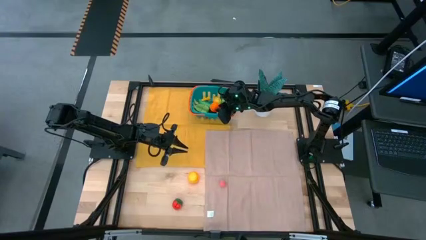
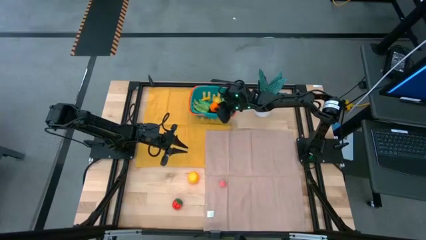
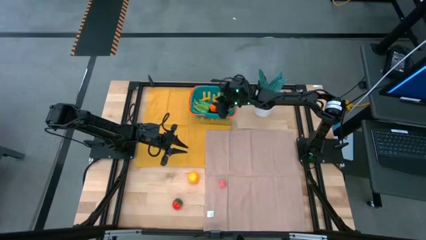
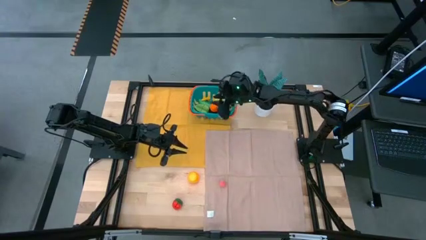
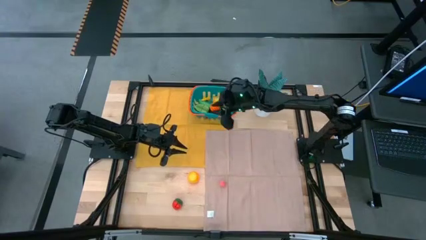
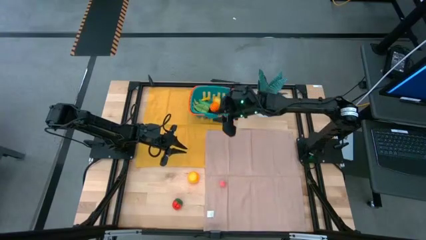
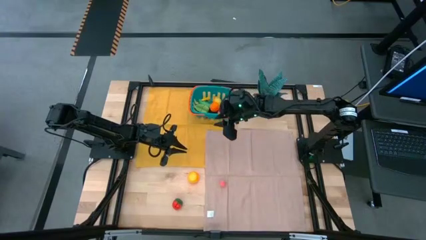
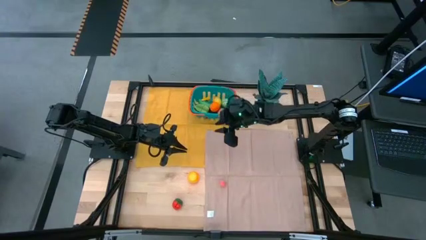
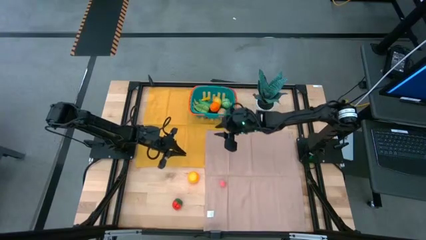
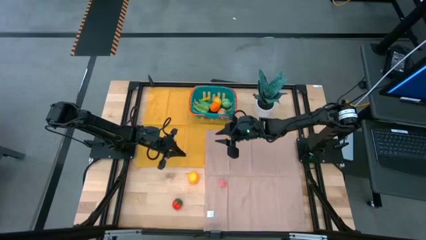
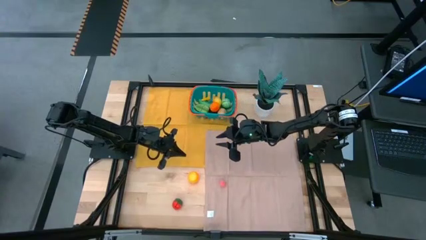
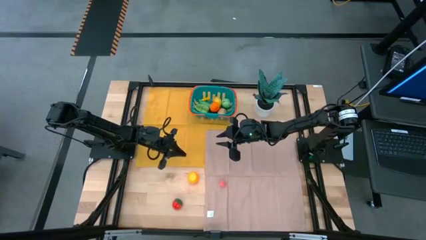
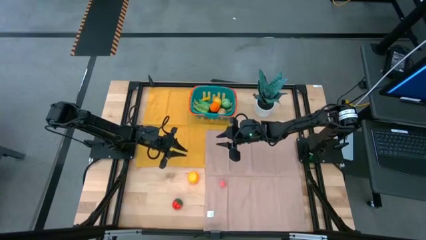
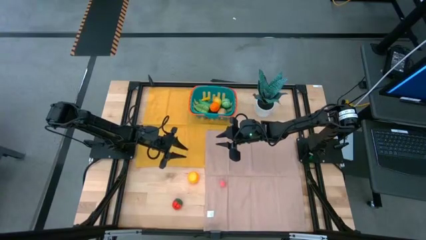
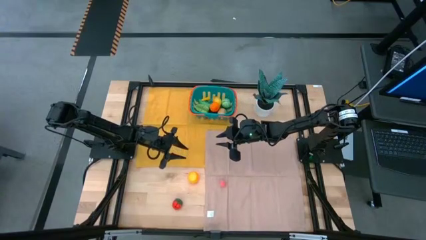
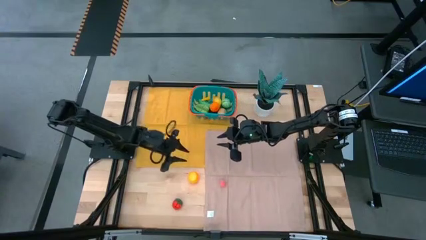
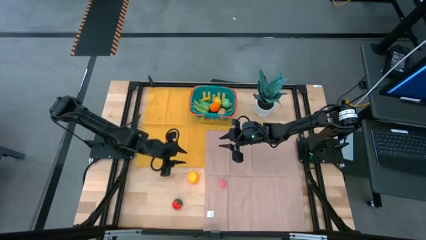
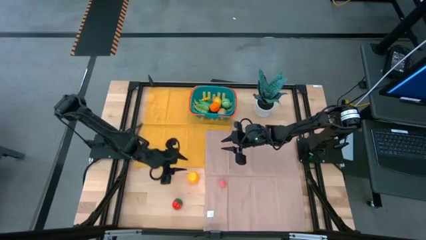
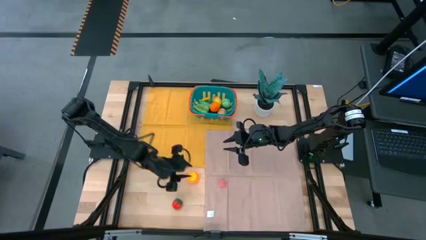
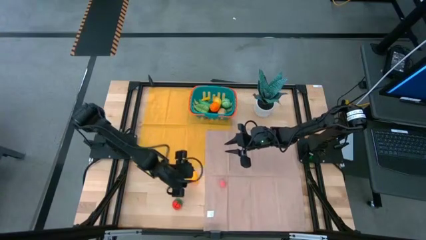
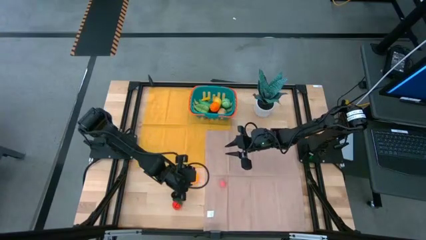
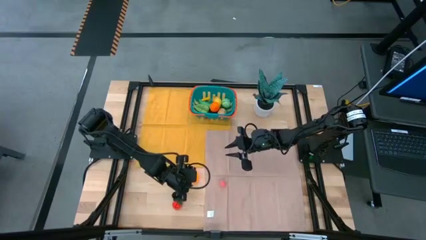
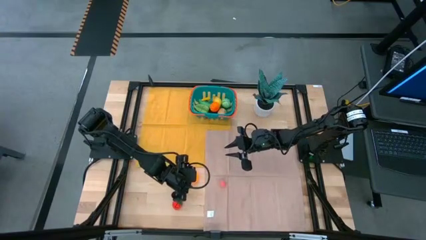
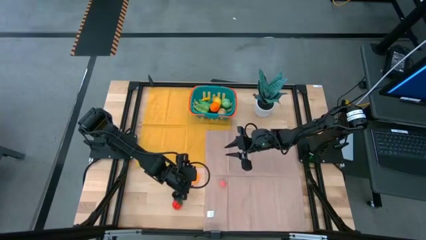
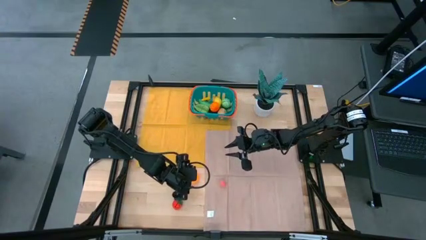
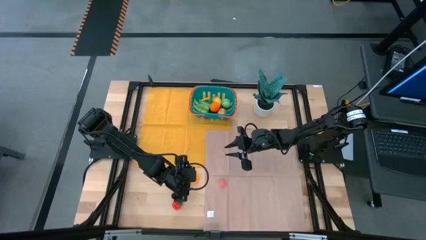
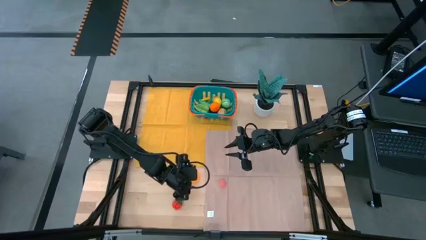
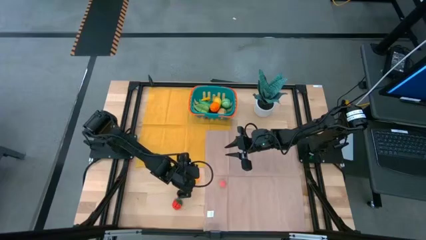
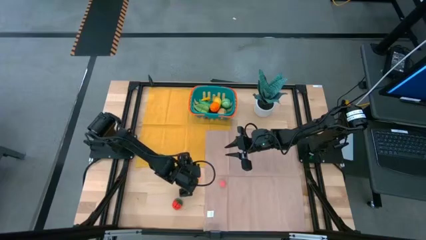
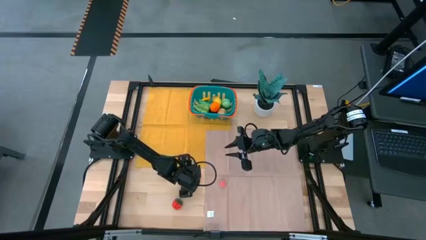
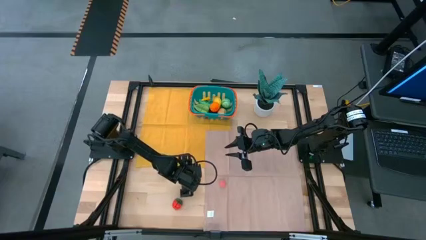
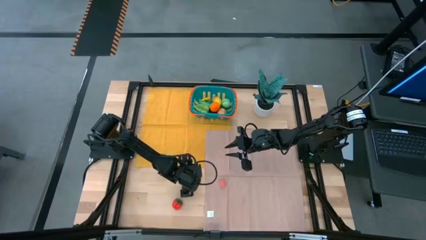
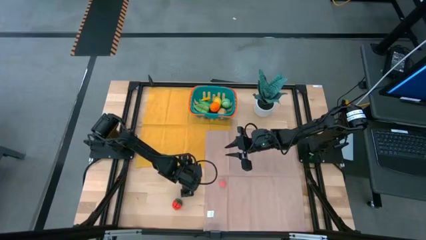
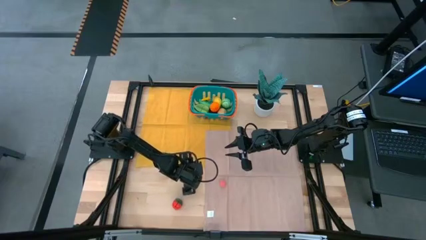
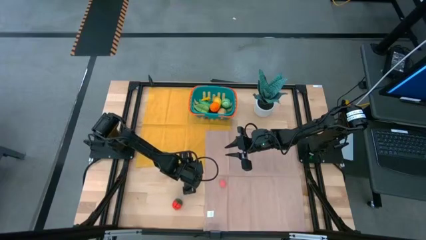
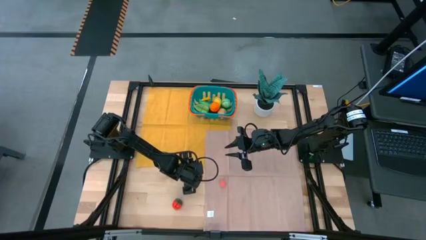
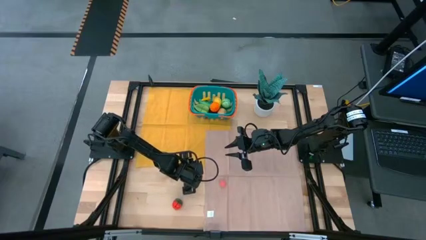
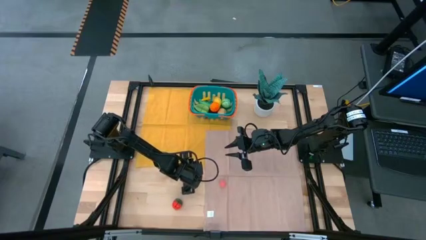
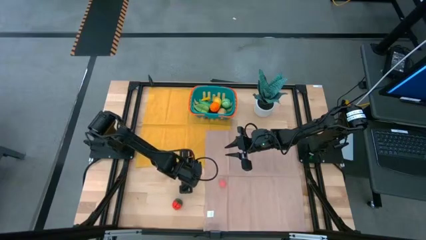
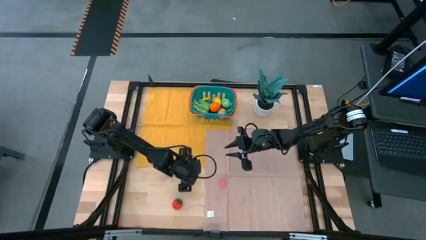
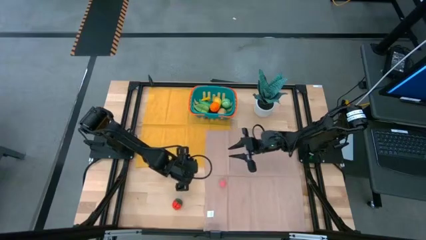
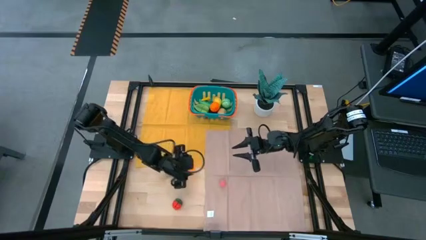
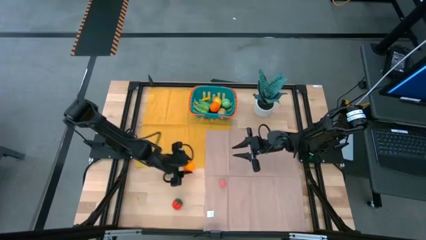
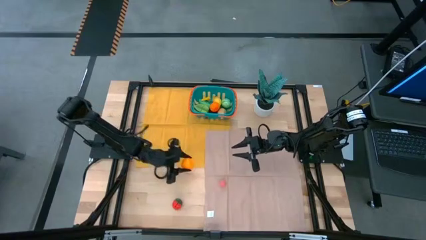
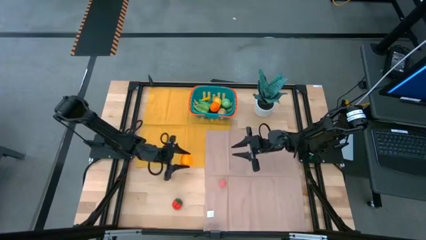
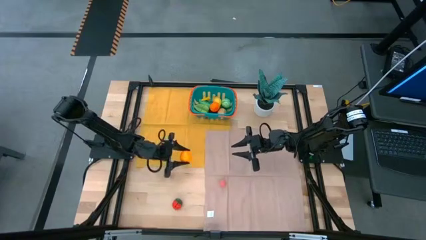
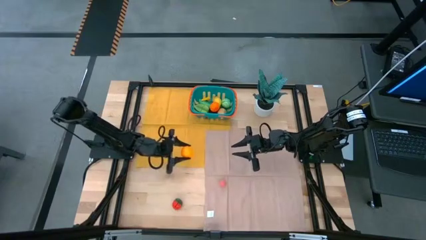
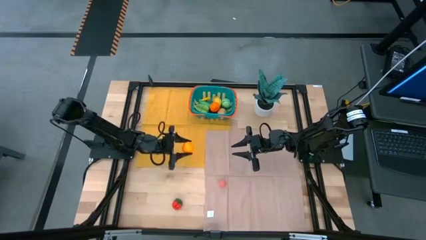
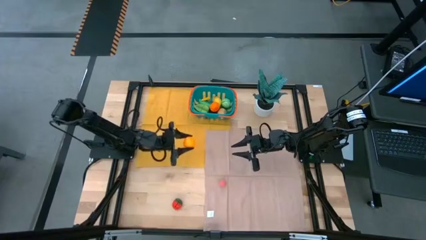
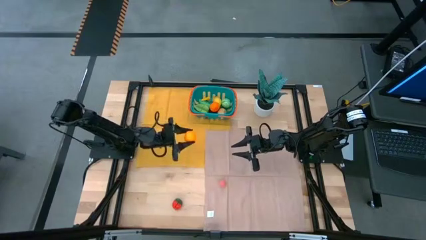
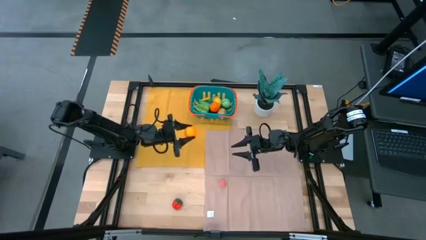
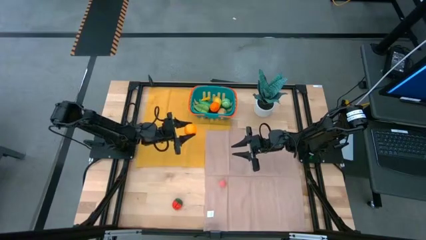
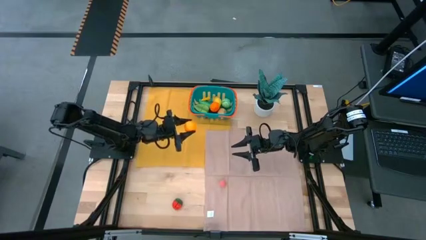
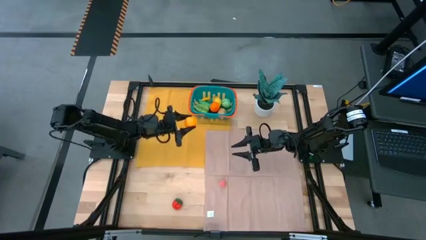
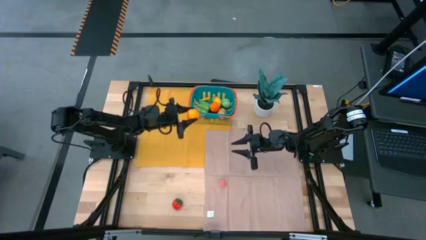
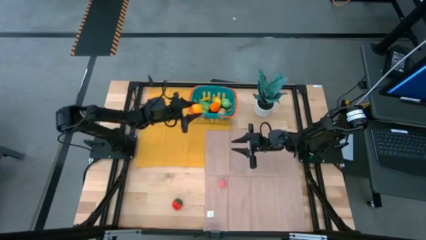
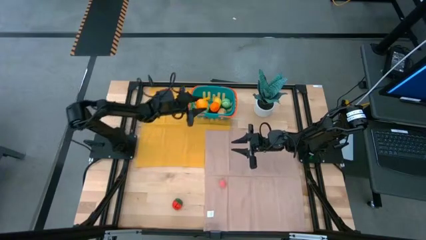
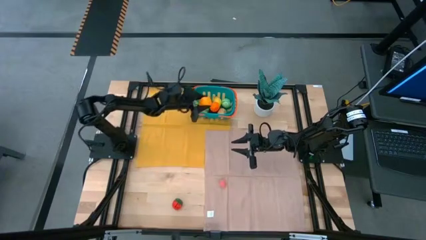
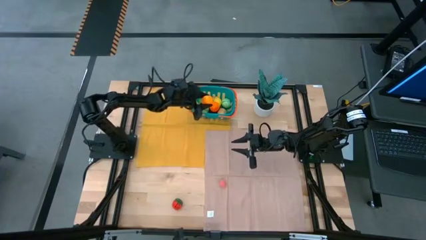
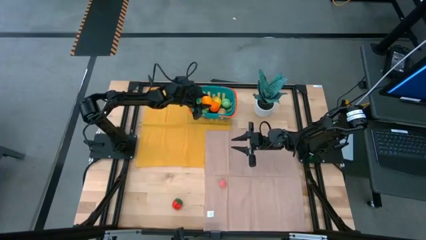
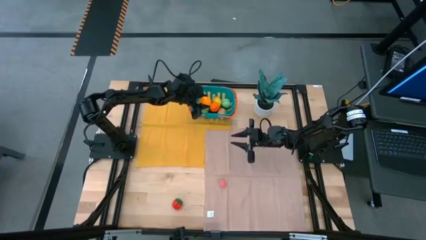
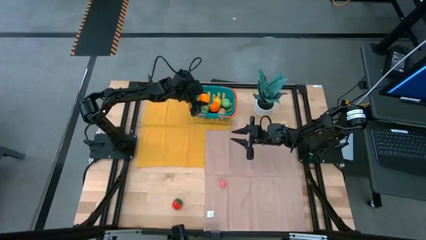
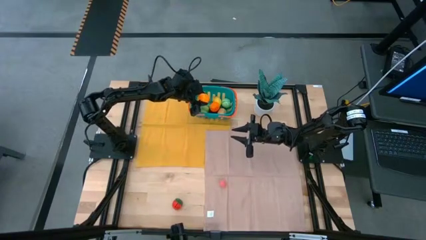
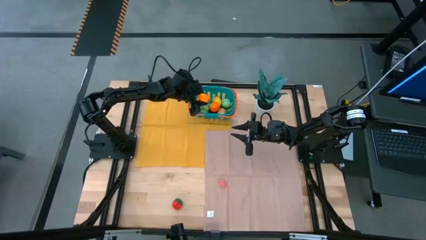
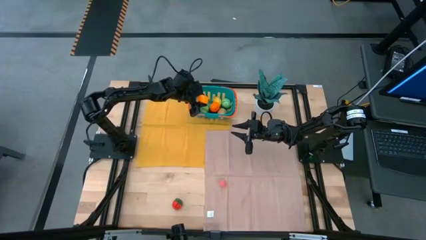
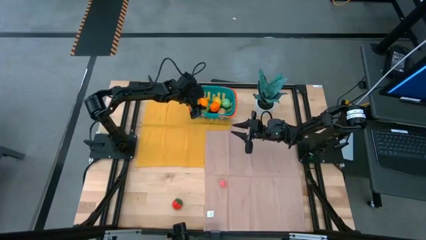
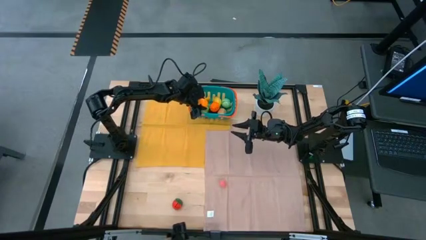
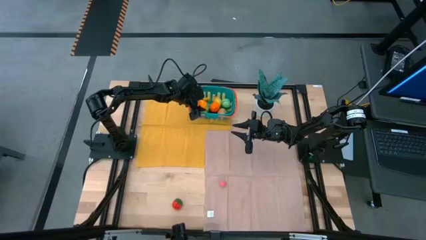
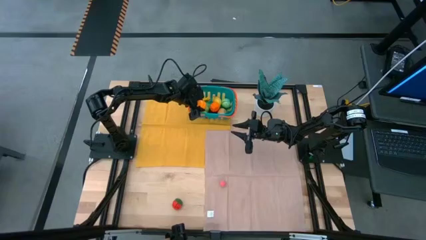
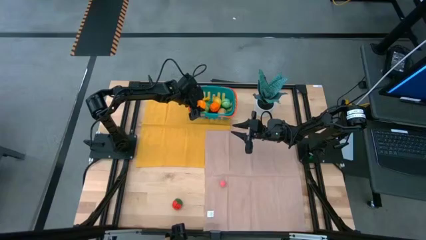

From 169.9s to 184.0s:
Task: Pick and placing Produce into tupperware
Put the orange into the blue basket

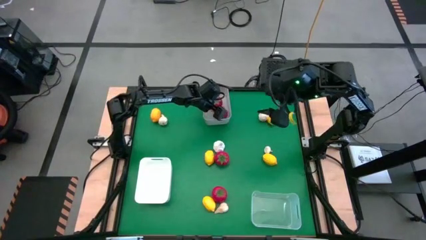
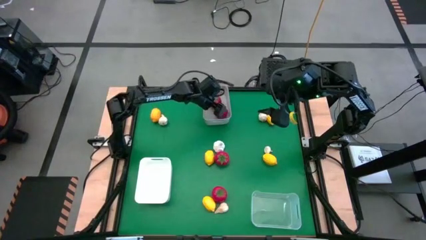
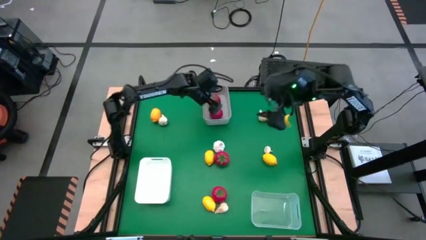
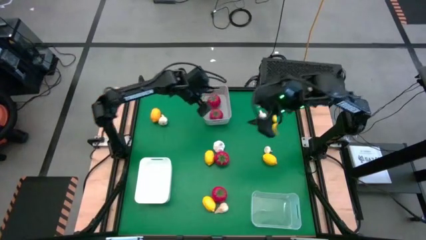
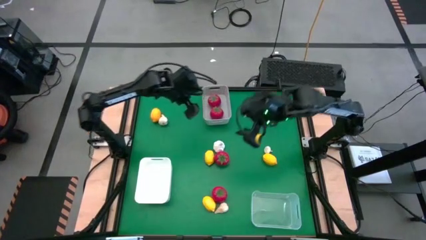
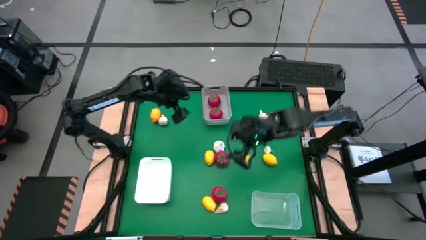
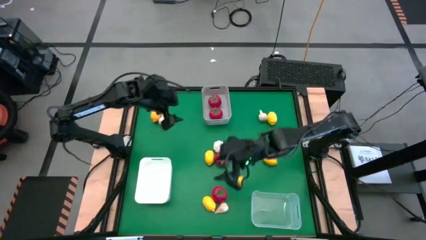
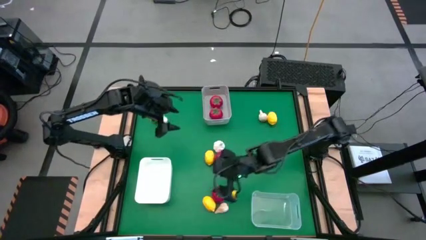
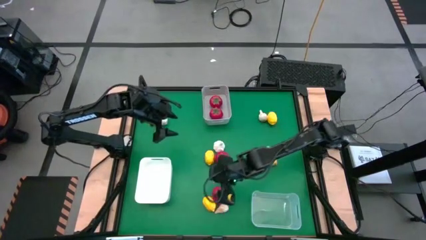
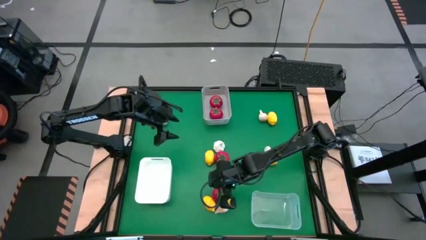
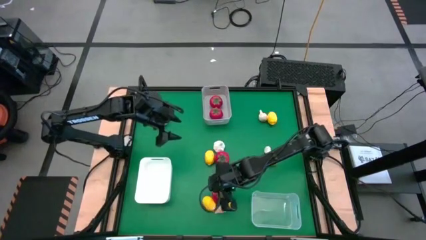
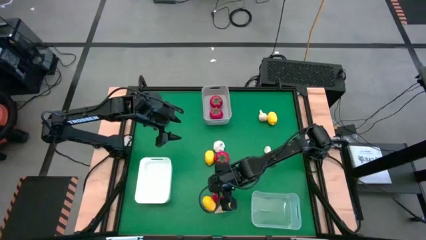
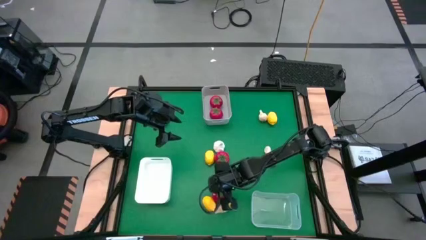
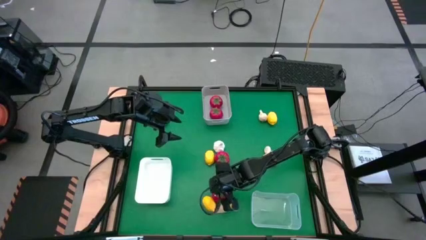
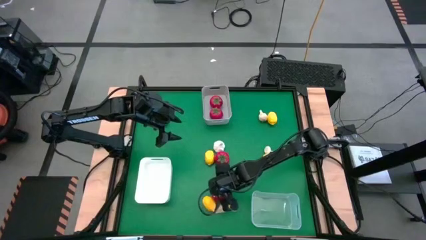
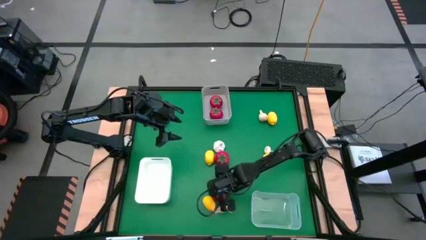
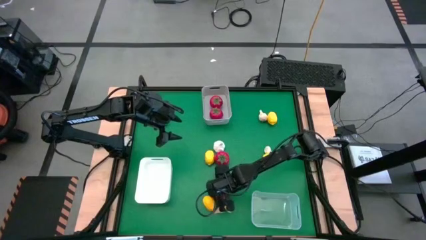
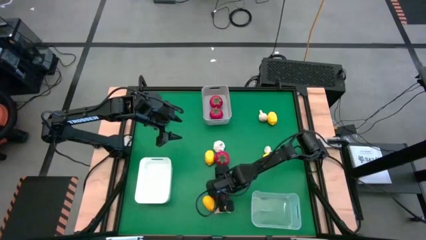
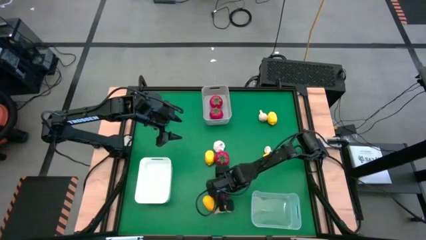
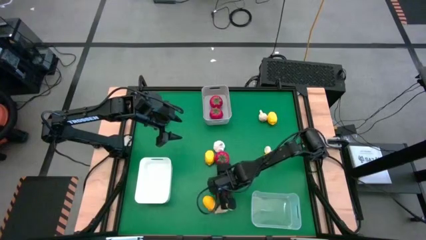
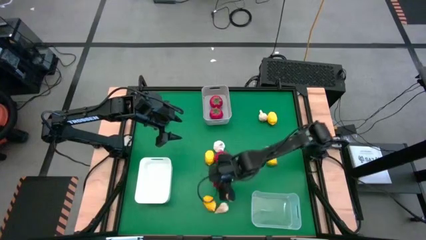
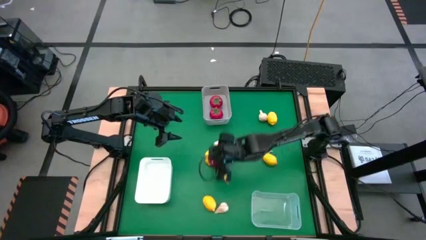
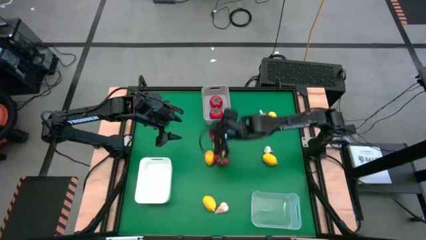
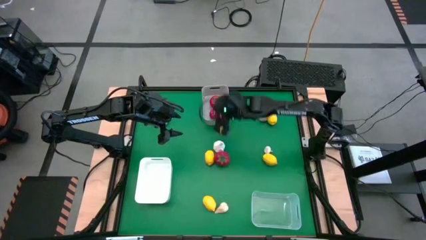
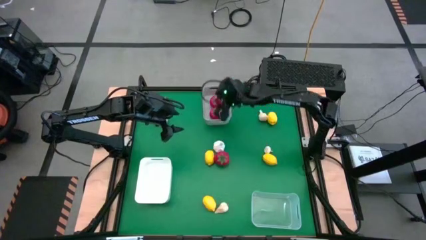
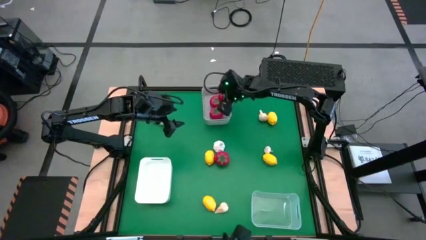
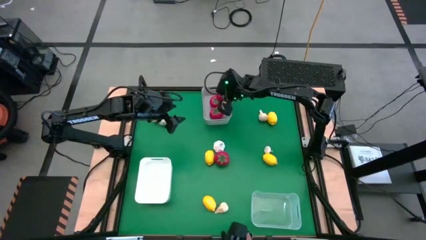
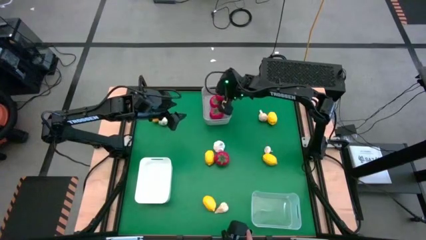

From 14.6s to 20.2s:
Task: Sort produce into baskets
Put the bottom tomato into the gray bin
